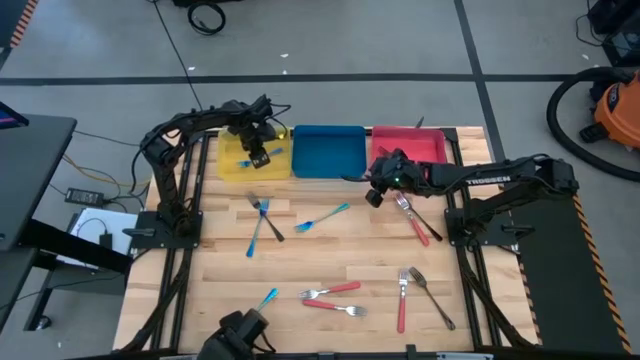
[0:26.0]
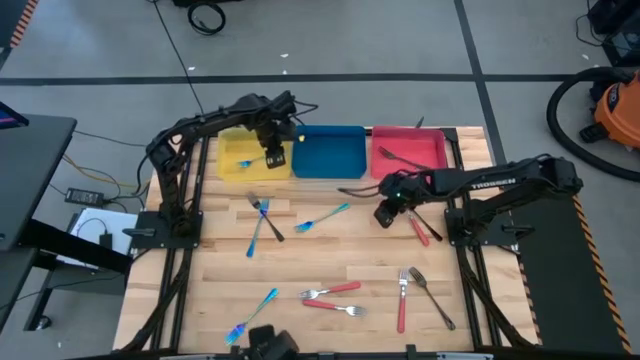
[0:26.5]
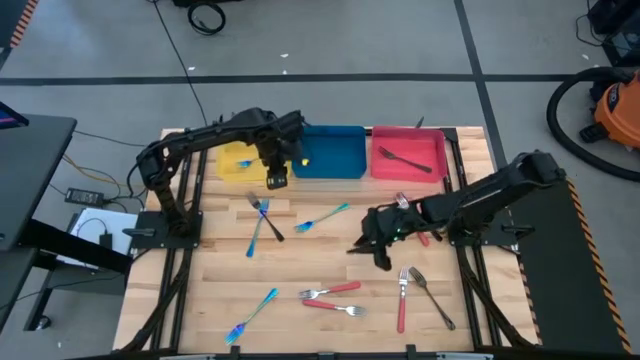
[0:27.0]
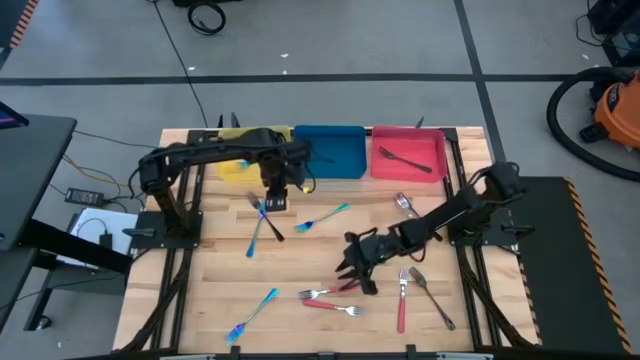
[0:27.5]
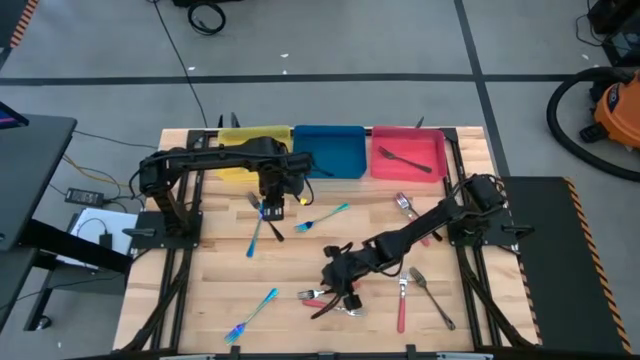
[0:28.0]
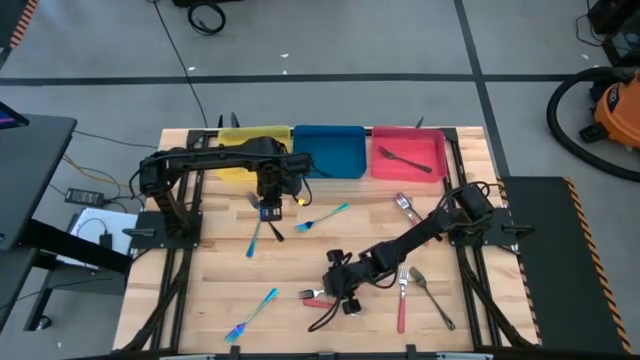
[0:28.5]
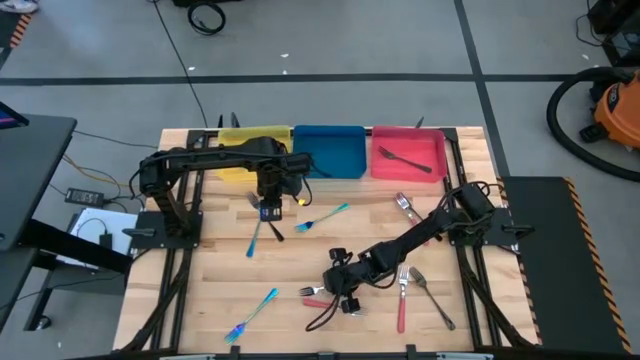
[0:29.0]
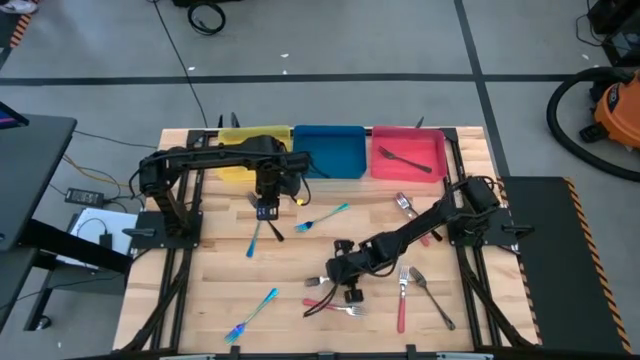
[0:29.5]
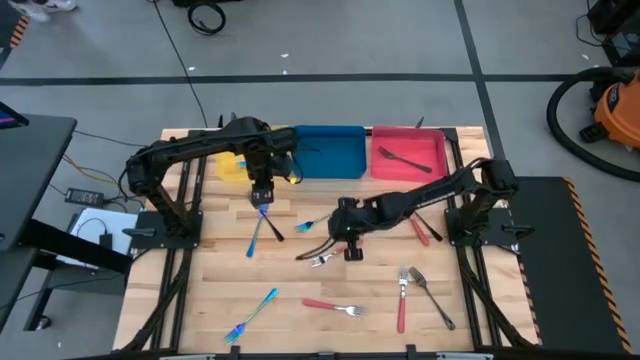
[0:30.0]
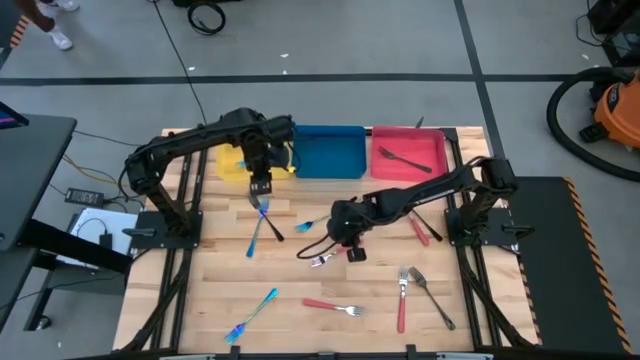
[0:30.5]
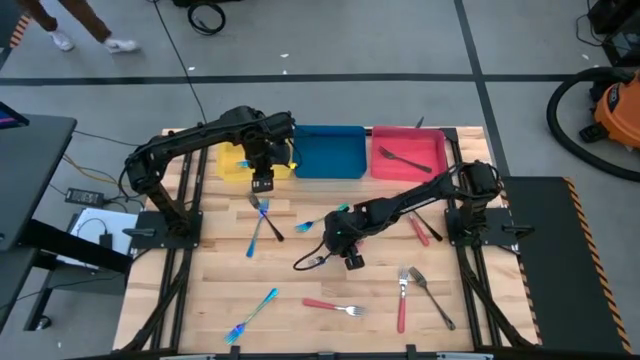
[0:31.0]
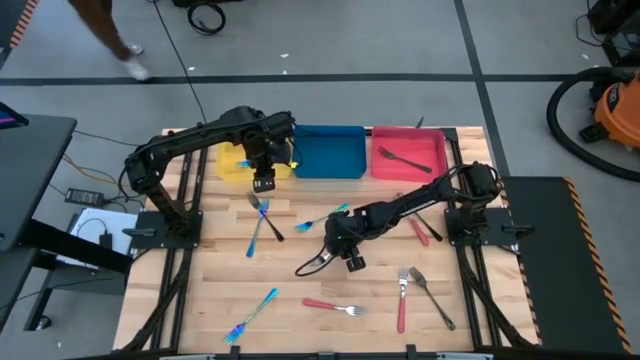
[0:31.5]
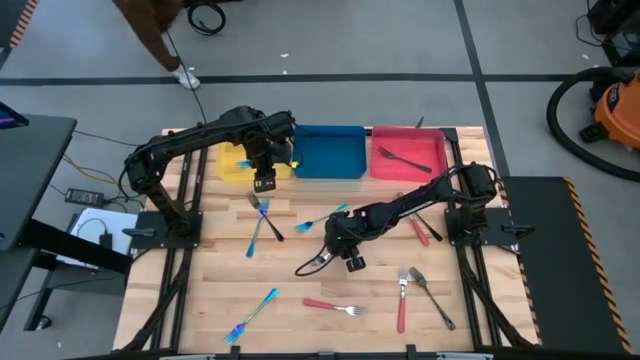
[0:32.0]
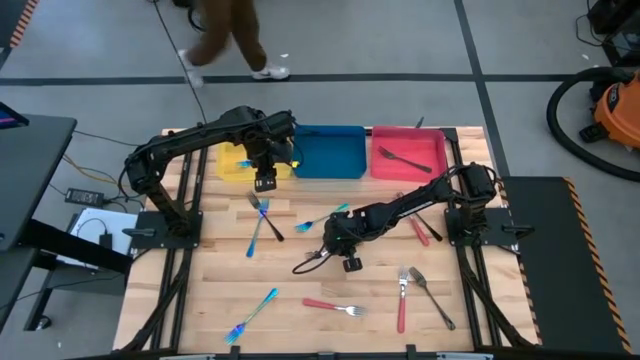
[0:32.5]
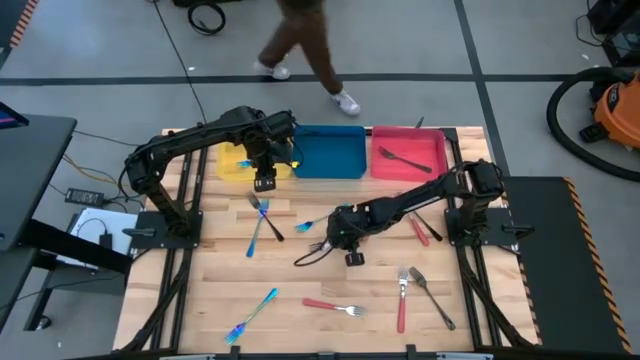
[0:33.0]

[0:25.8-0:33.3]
Task: Sort silverware by color (type)
Put the pink fork into the blue bin

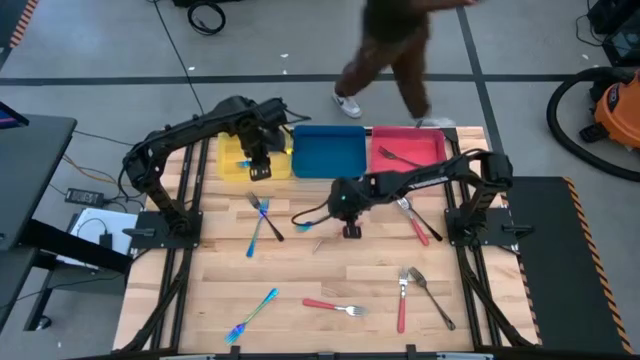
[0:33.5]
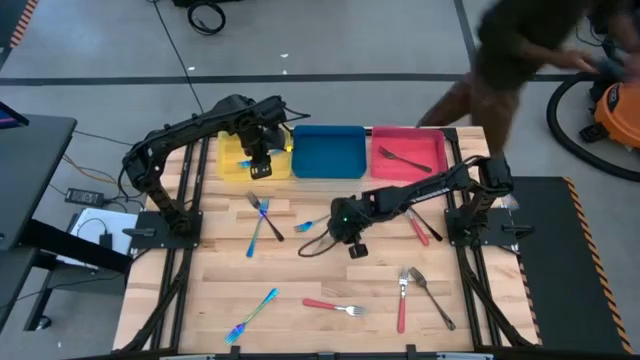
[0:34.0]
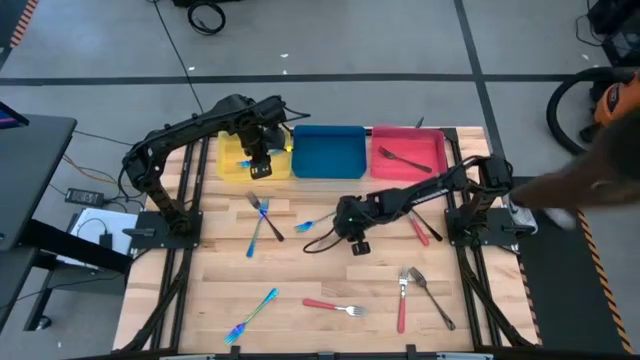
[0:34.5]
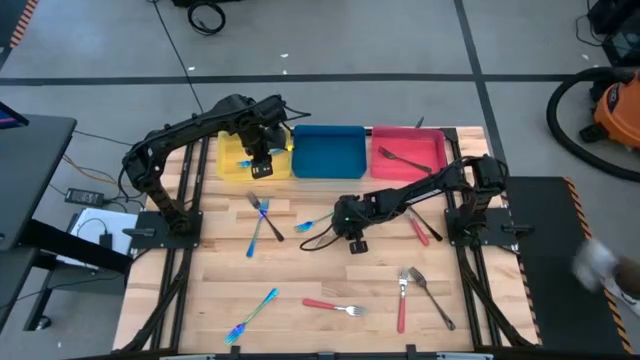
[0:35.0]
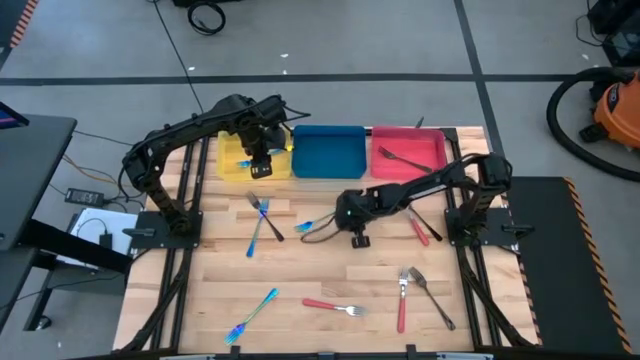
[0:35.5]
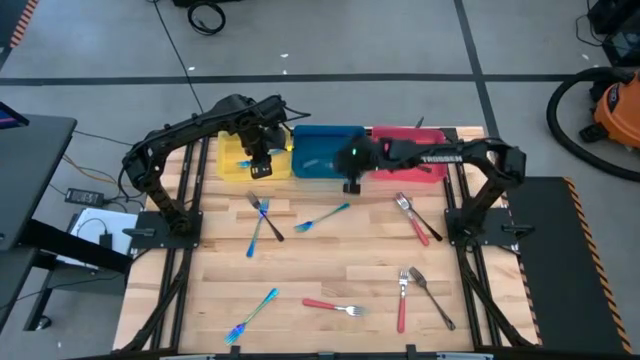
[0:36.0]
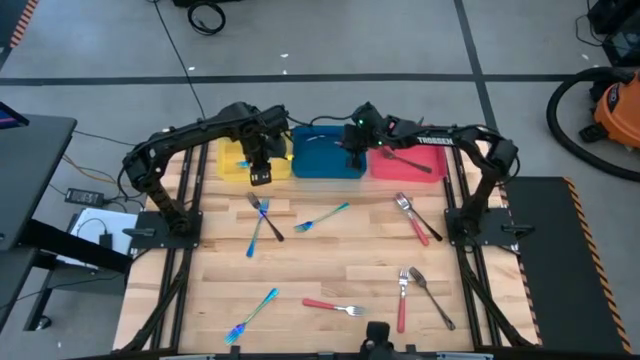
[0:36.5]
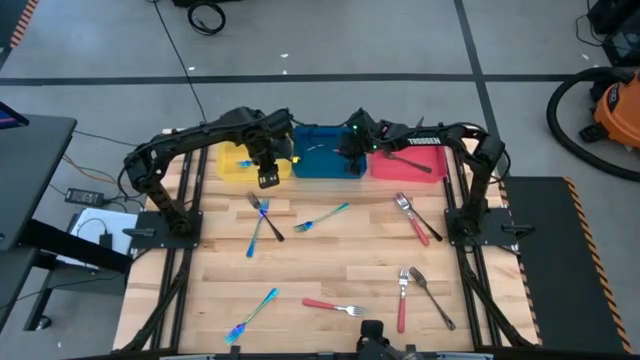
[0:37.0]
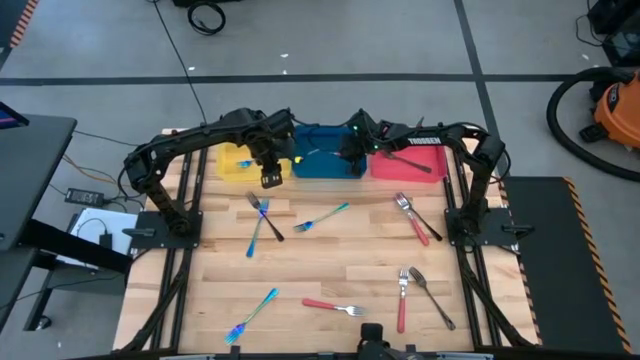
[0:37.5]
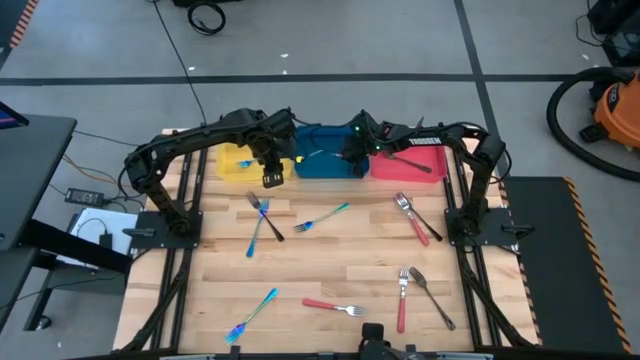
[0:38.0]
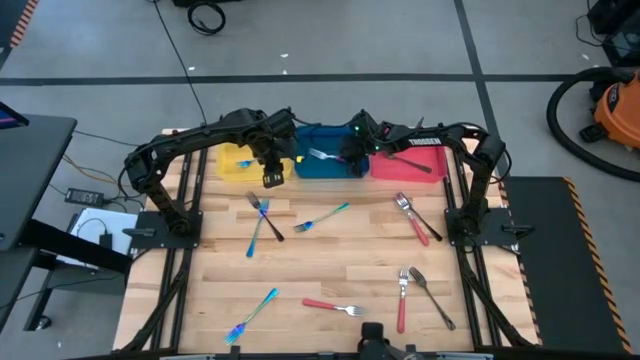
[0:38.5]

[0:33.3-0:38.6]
Put the pink fork into the blue bin

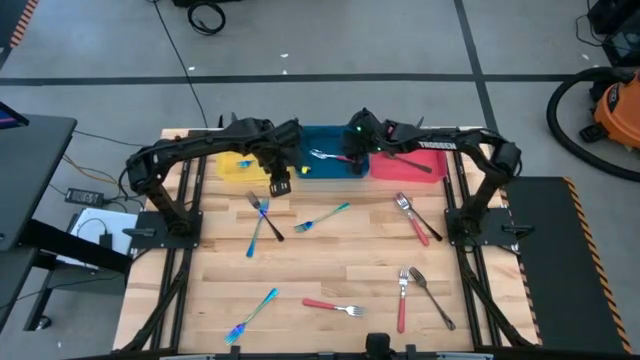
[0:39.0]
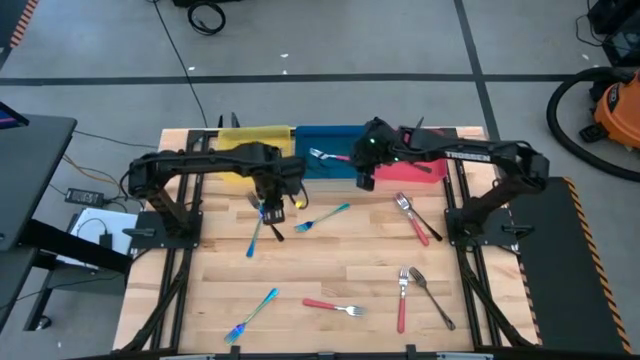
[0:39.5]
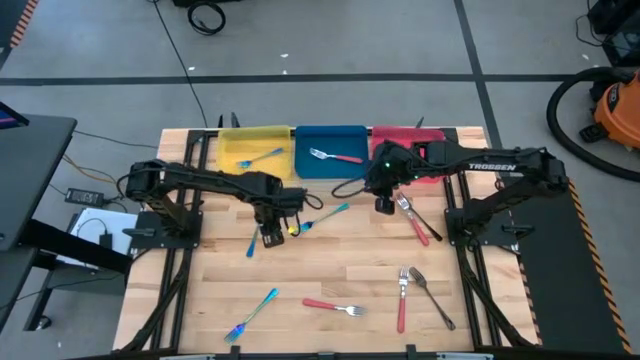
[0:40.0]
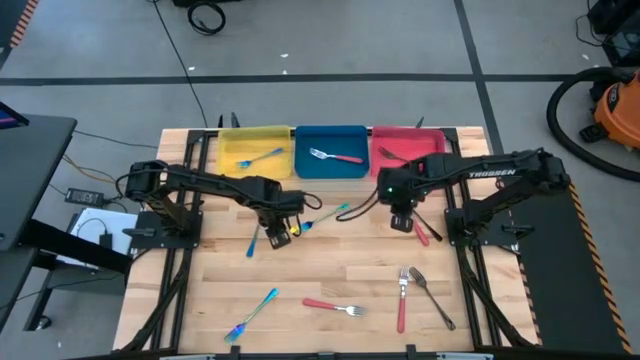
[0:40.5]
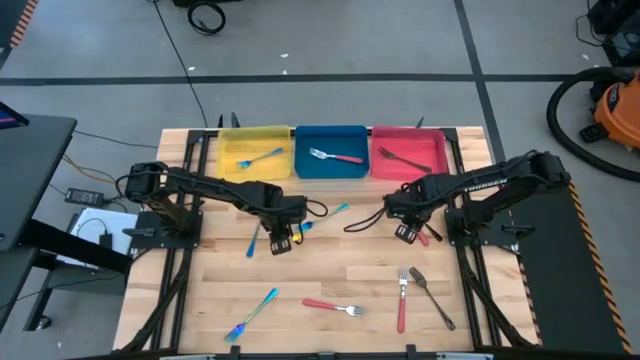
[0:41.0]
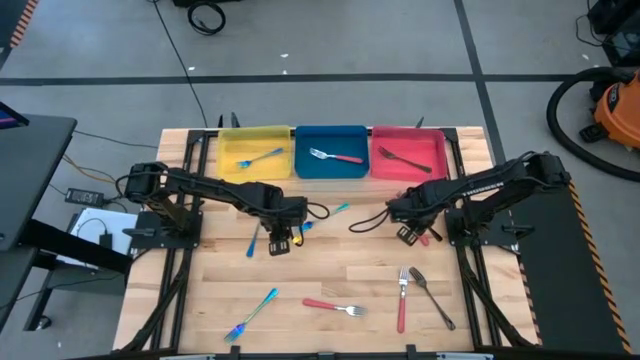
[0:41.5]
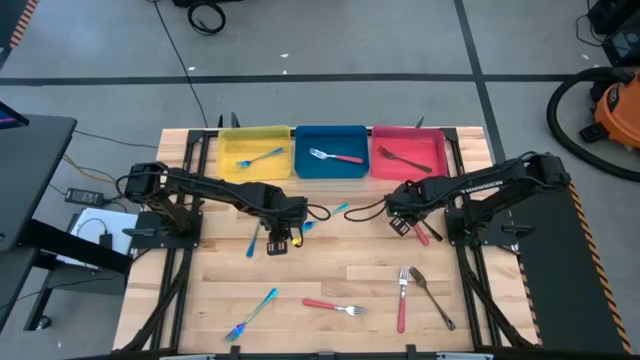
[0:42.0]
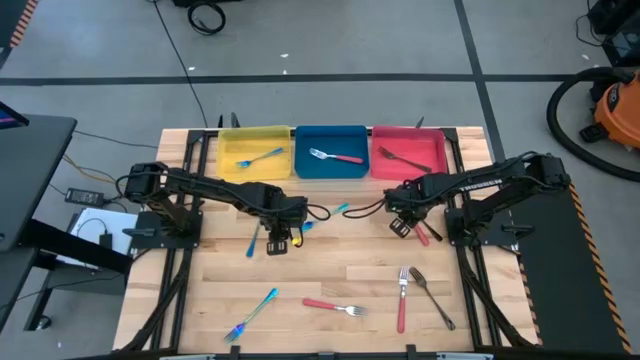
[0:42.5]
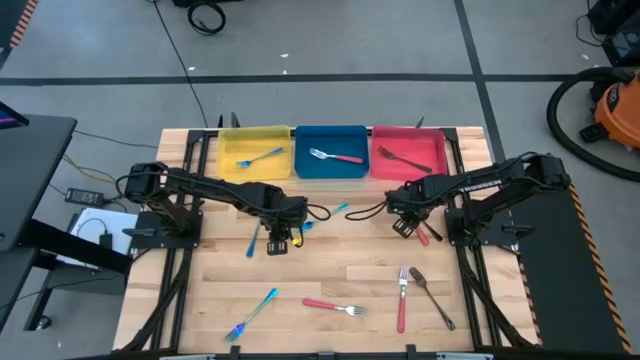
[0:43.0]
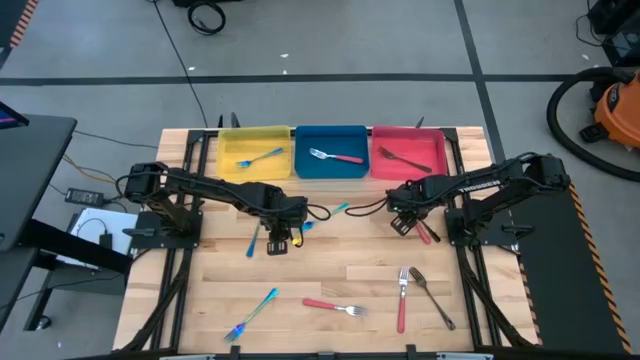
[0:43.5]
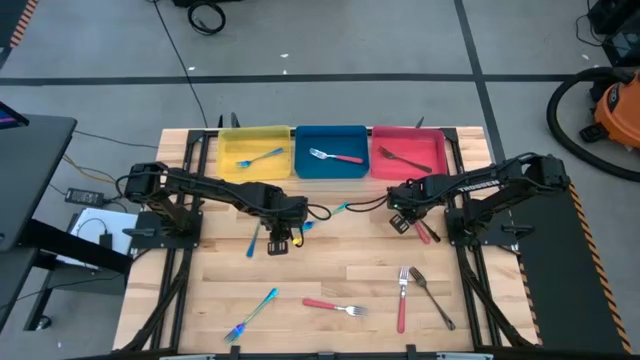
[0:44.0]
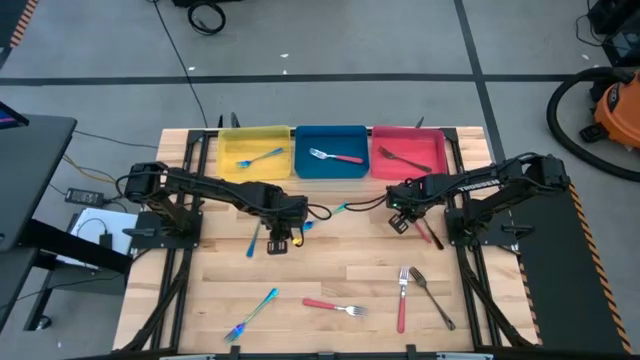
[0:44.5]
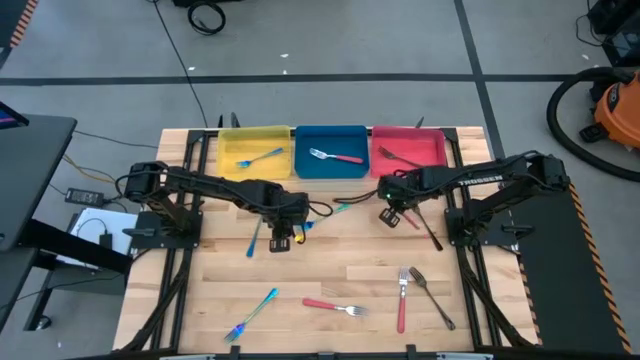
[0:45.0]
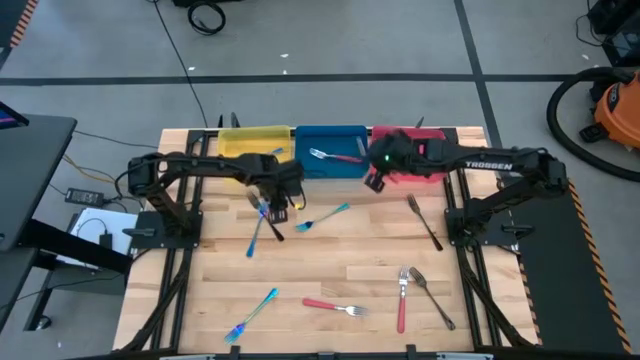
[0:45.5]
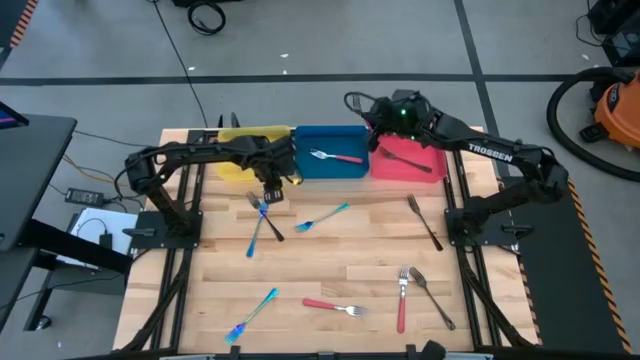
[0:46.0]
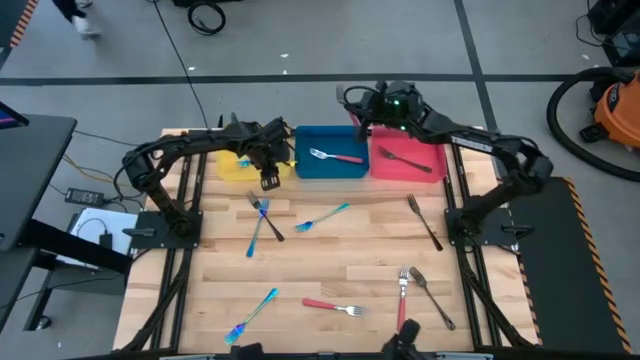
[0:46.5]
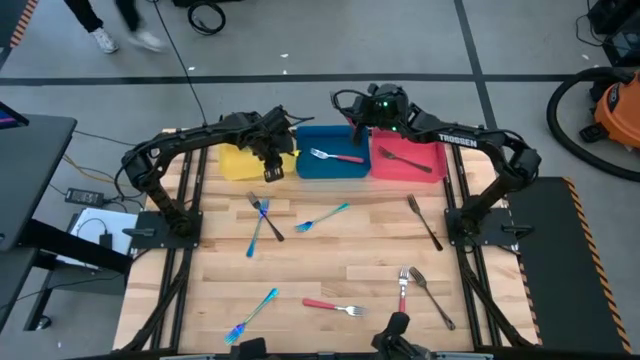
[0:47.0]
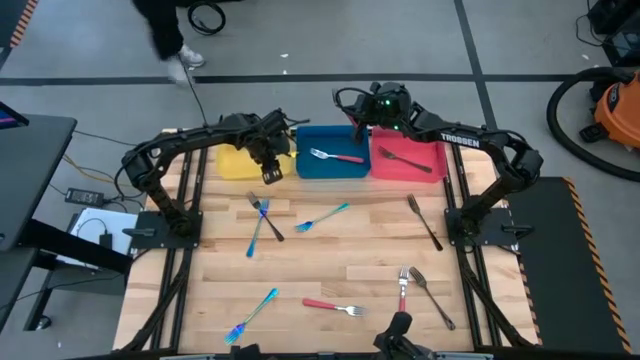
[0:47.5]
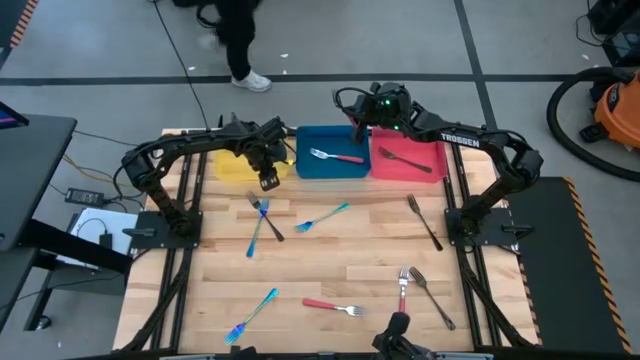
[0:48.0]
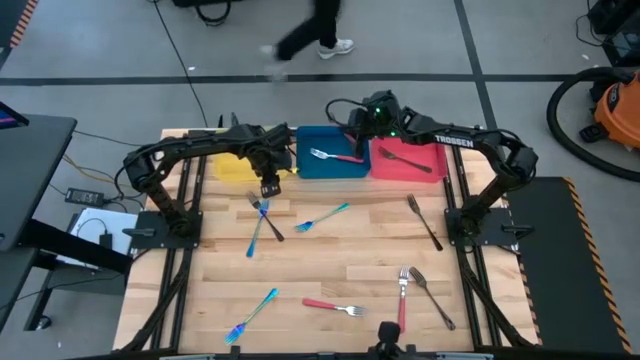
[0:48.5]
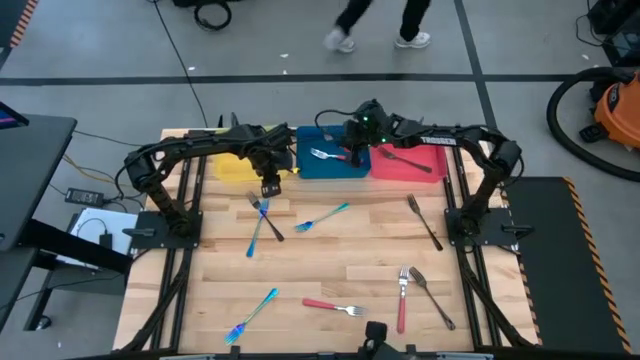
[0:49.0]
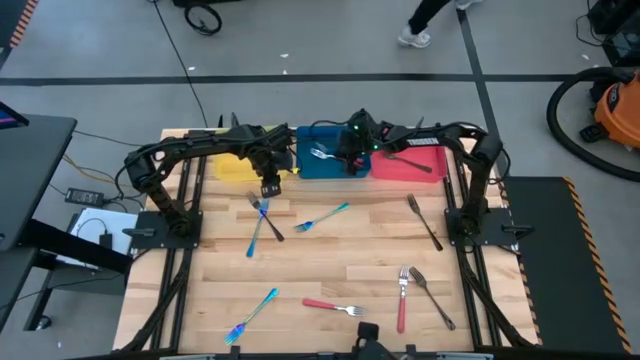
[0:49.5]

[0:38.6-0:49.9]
Put the pink fork into the blue bin
